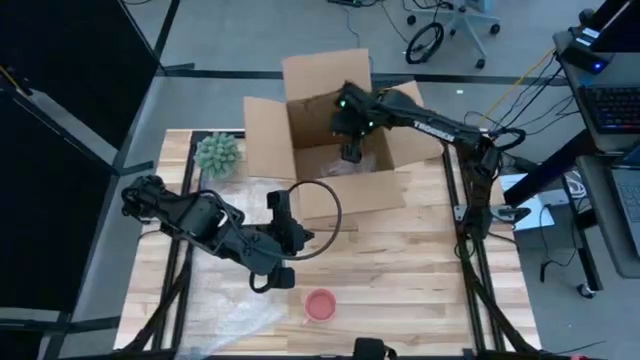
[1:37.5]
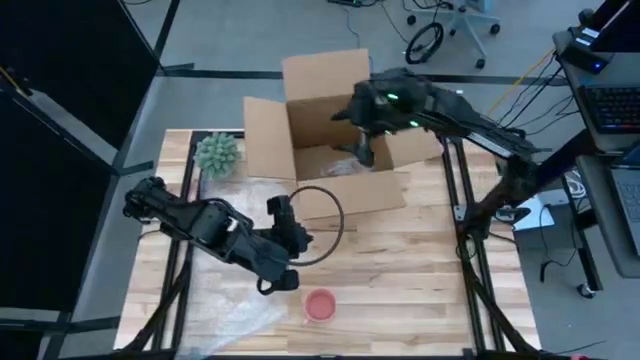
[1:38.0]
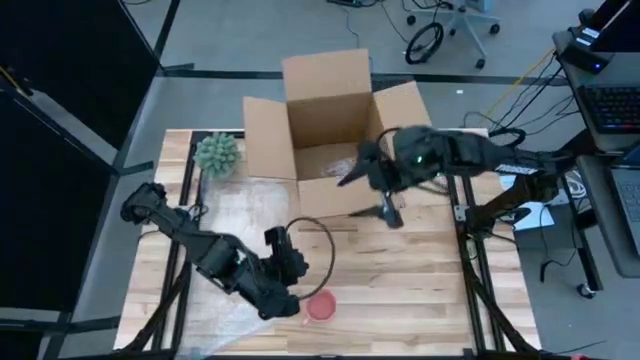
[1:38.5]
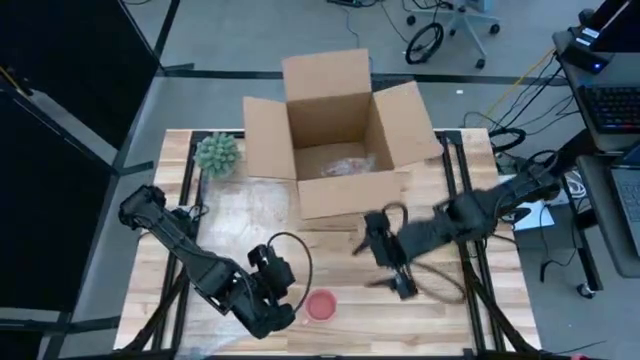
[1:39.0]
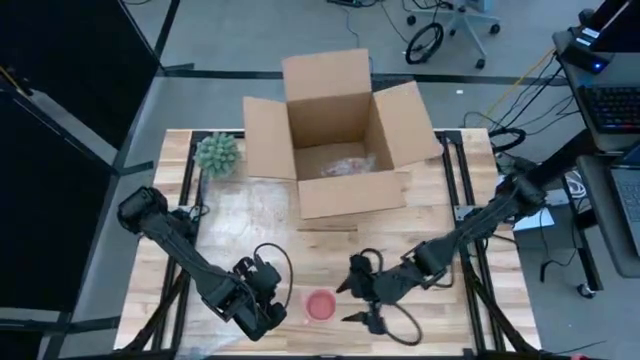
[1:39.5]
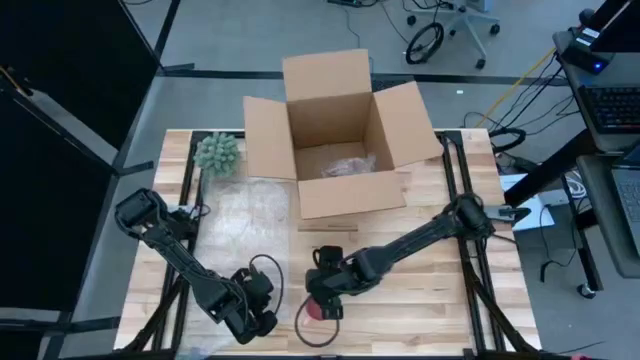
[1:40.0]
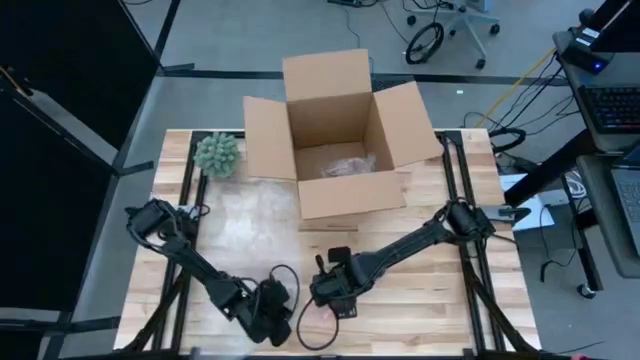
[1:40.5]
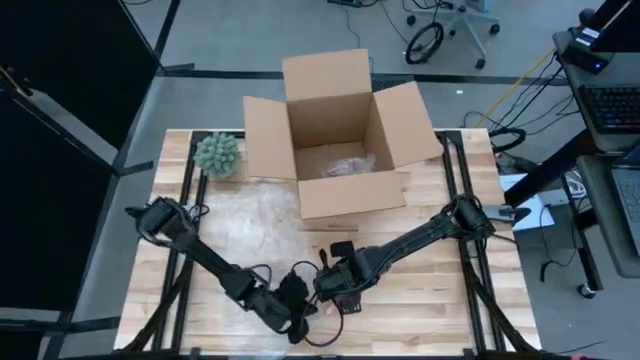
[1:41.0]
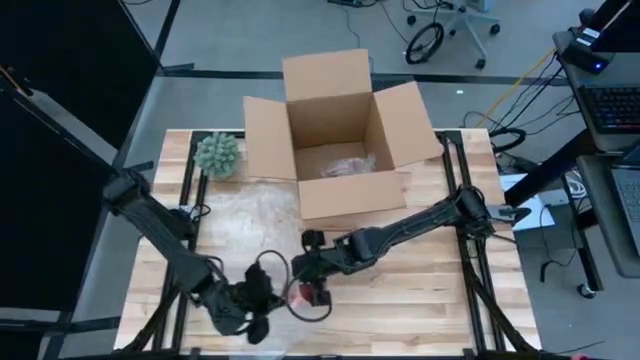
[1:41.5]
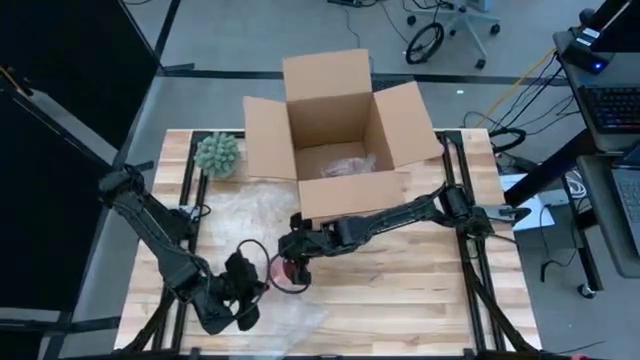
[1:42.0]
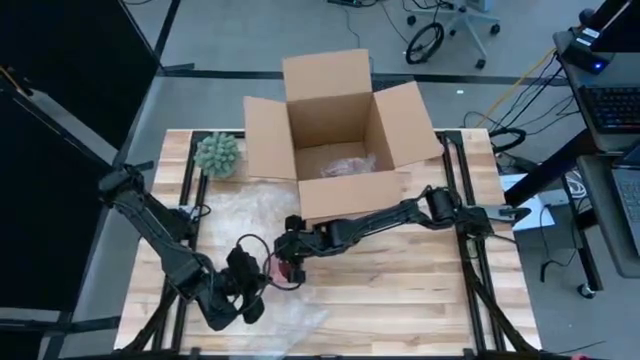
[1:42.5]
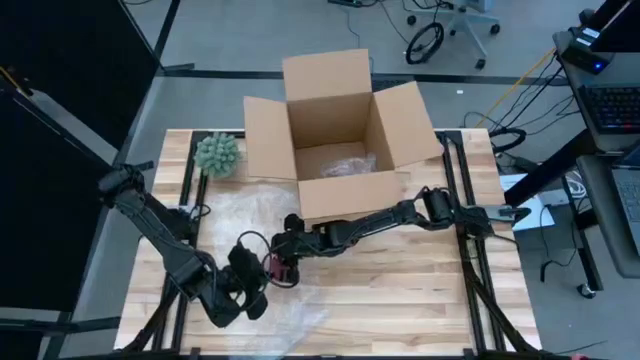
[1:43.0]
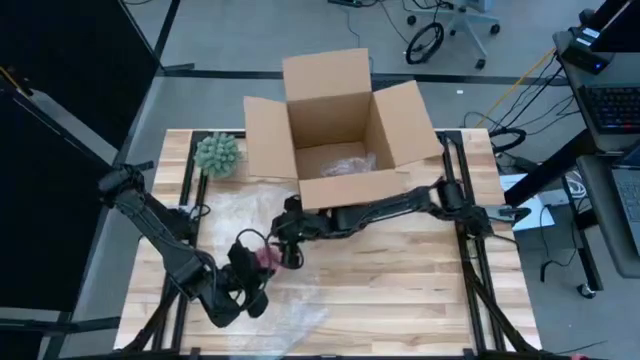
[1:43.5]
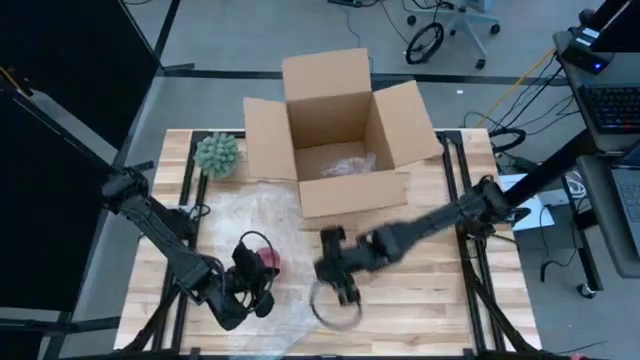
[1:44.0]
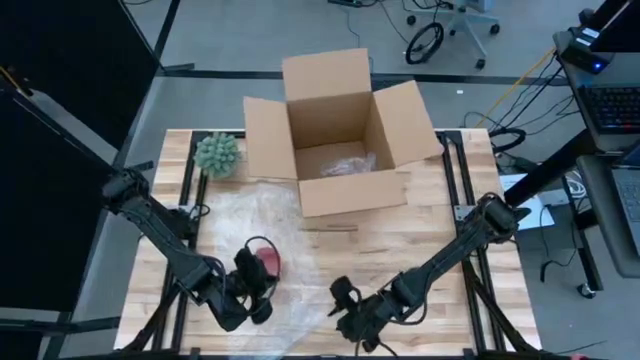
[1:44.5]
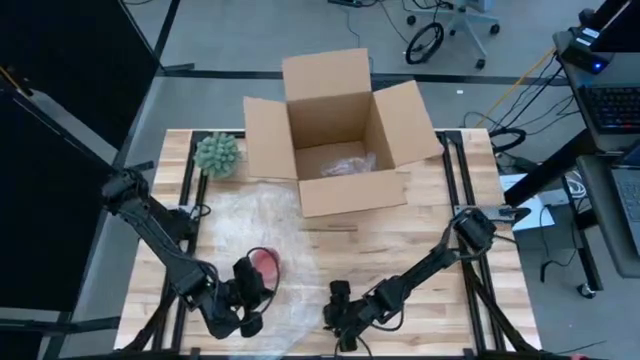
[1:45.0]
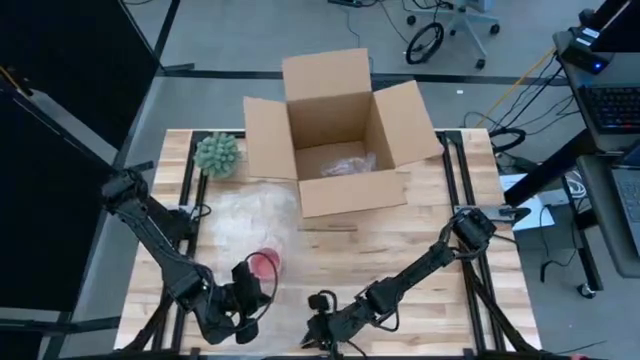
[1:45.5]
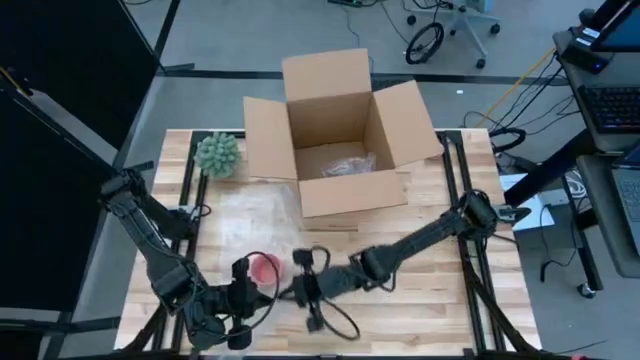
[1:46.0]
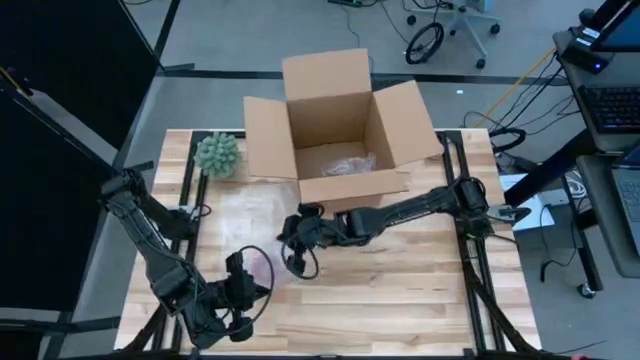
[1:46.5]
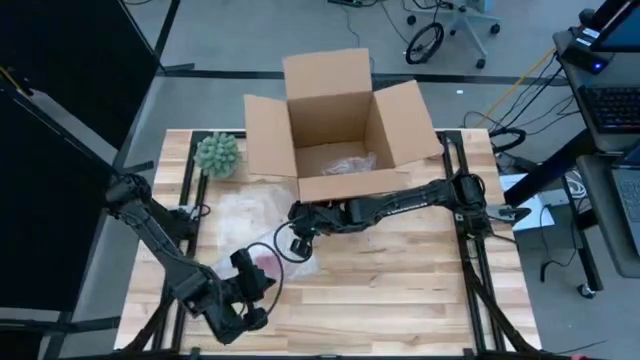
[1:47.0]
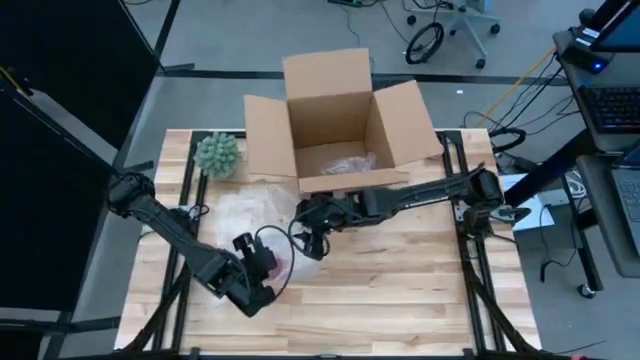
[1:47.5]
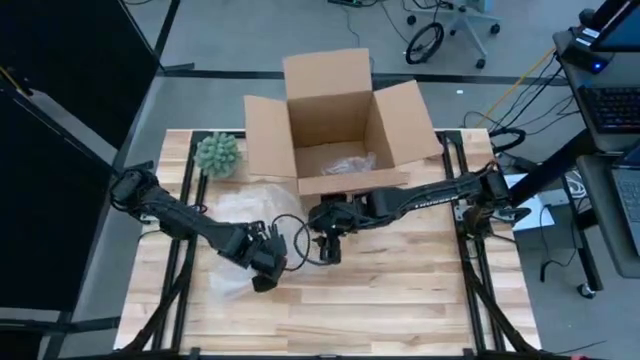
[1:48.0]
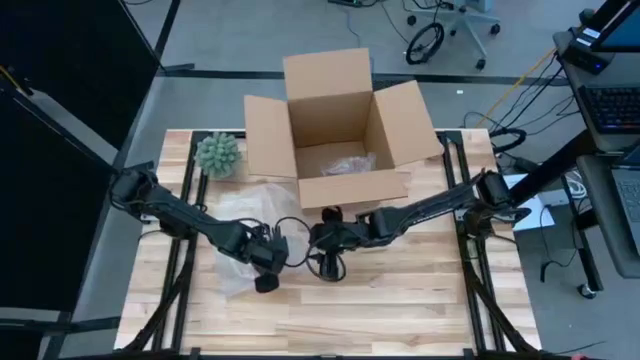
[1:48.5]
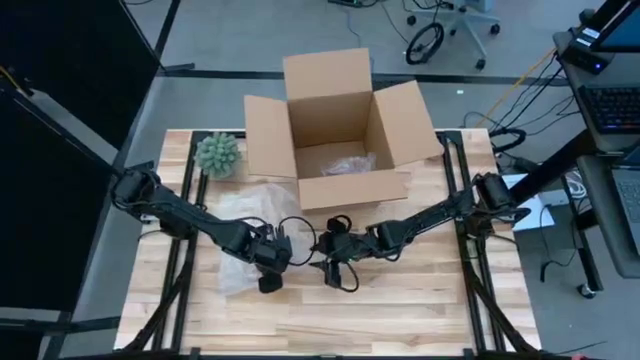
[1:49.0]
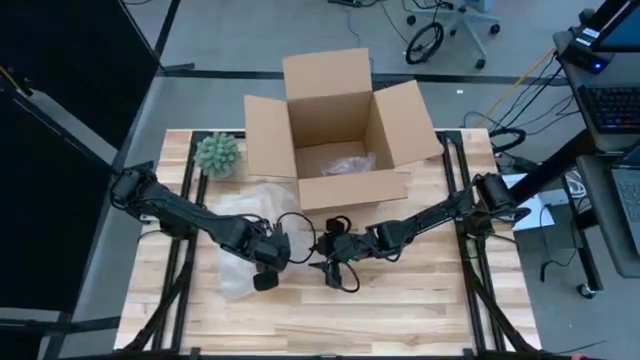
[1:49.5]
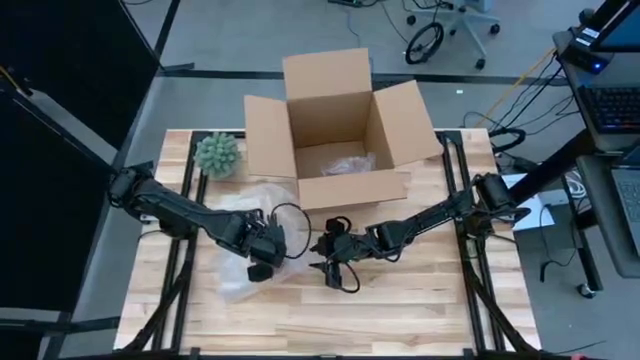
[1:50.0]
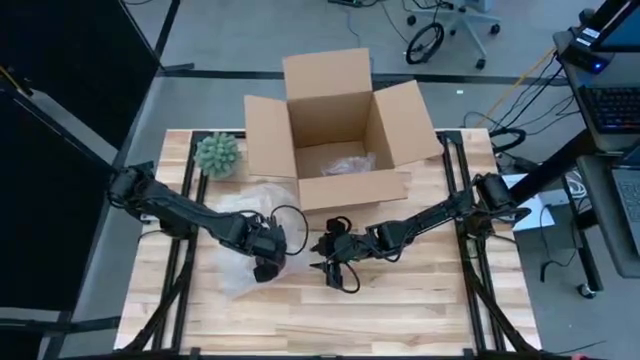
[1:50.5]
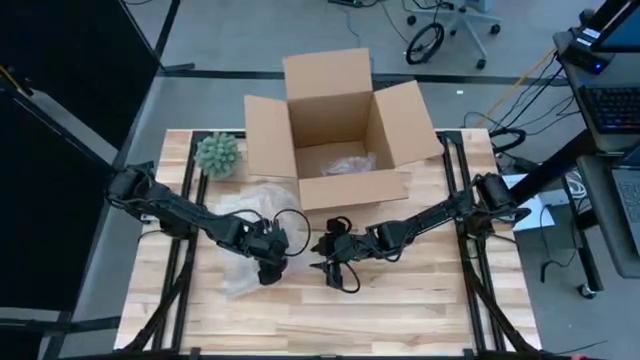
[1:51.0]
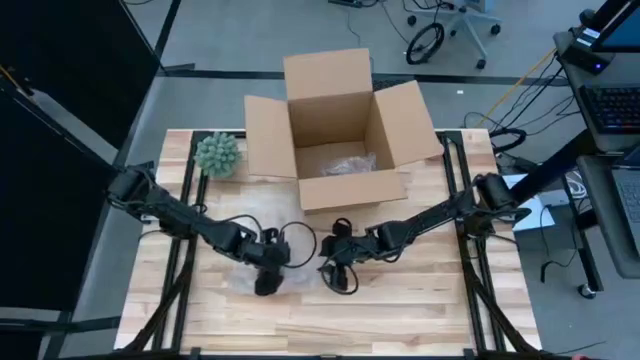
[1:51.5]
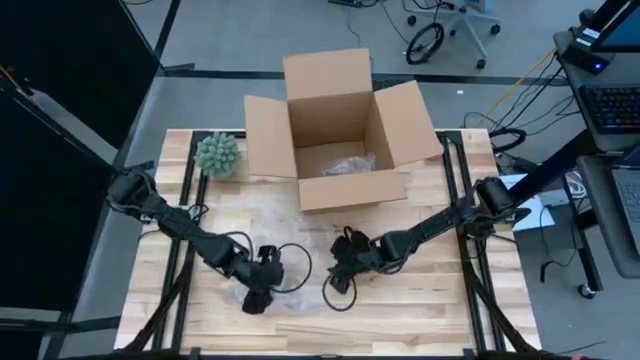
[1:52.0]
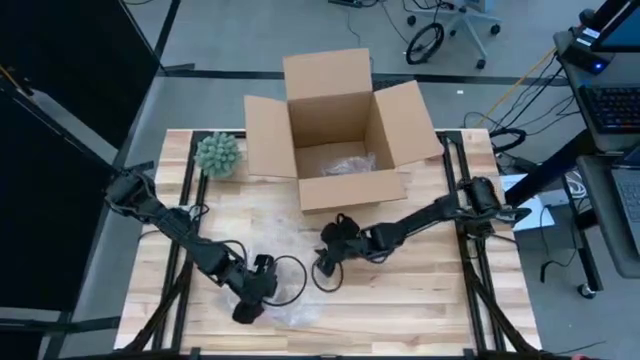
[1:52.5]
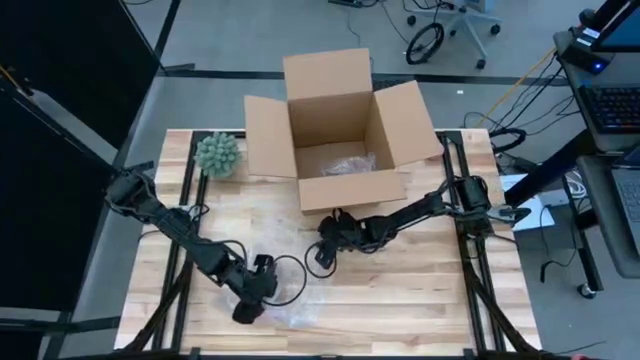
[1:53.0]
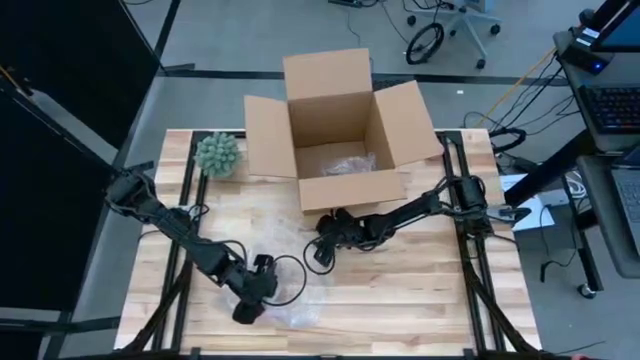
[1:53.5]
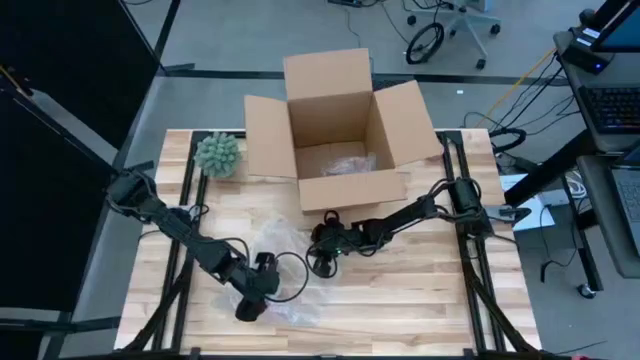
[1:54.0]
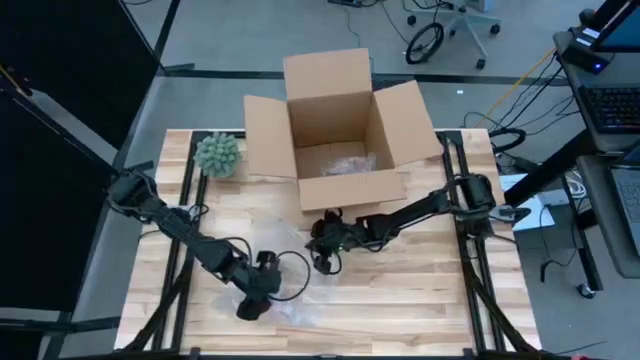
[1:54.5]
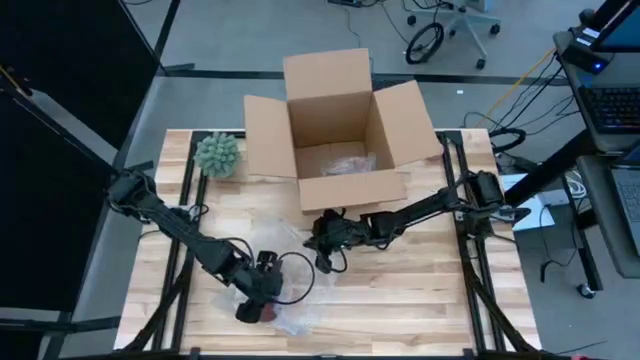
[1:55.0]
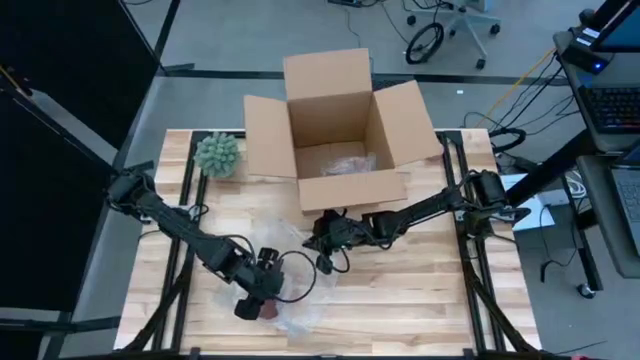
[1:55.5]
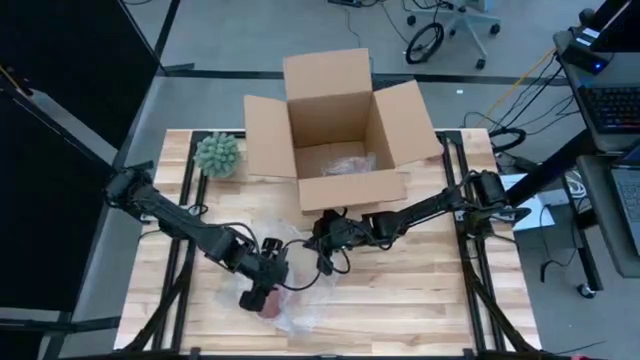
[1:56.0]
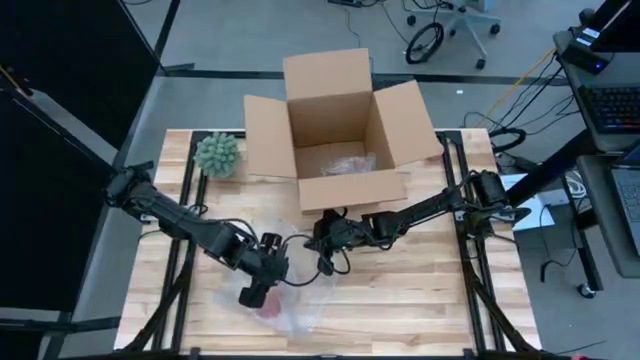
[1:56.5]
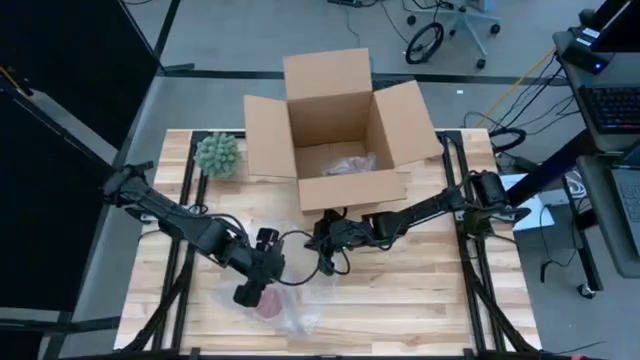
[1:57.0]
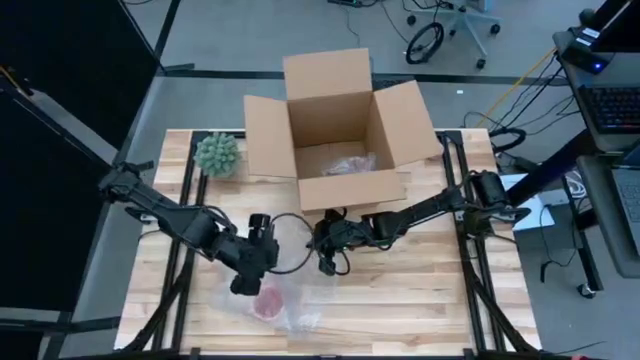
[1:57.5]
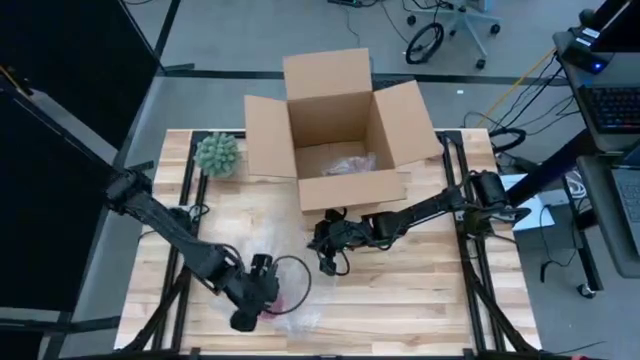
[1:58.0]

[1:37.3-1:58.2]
Task: wrap mug
Wrap the pink mug with bubble wrap
